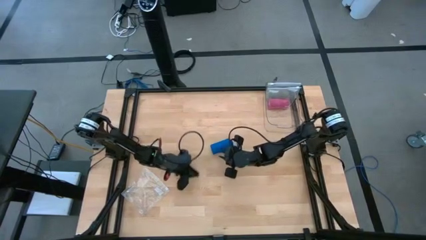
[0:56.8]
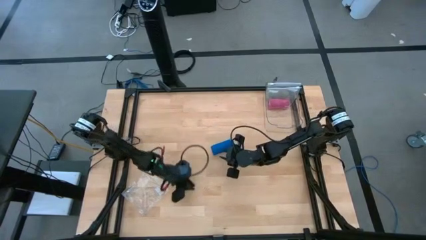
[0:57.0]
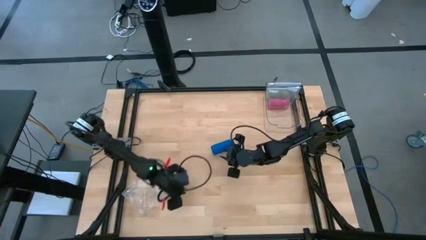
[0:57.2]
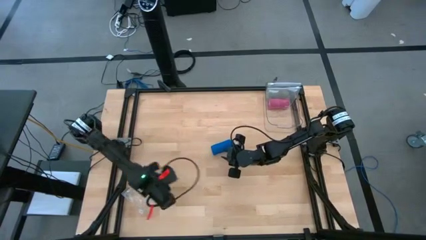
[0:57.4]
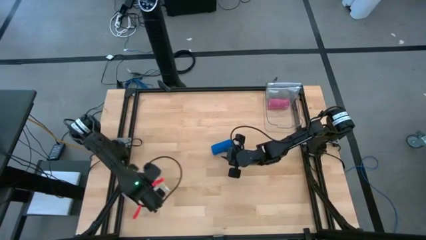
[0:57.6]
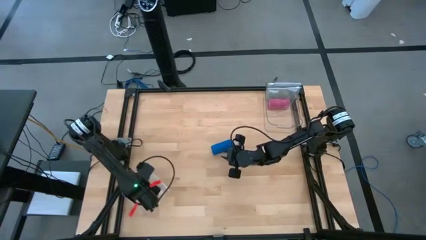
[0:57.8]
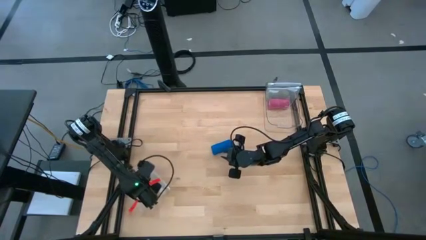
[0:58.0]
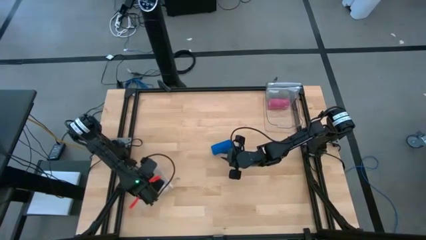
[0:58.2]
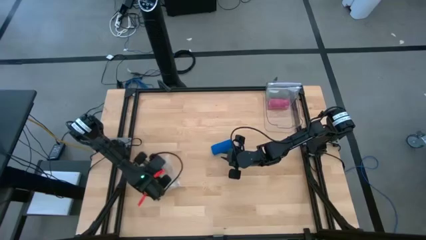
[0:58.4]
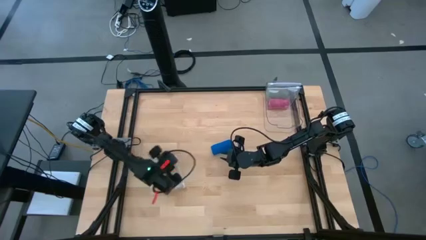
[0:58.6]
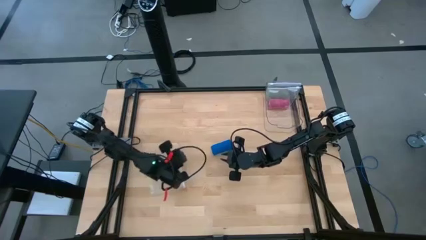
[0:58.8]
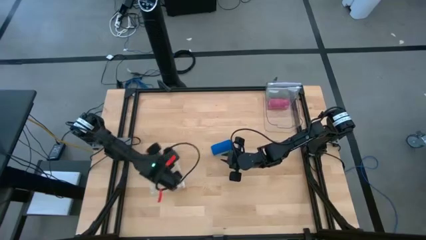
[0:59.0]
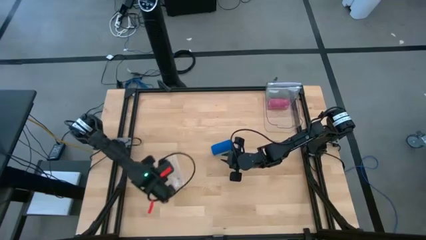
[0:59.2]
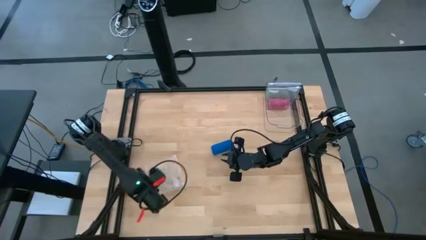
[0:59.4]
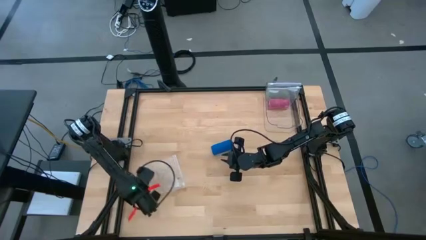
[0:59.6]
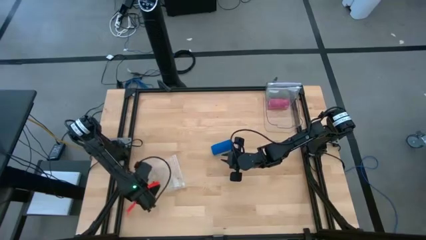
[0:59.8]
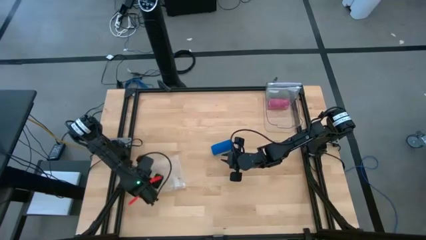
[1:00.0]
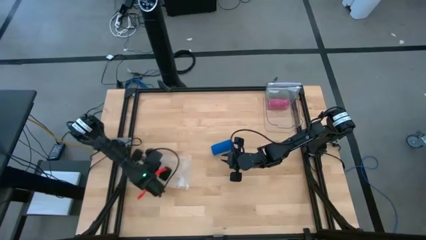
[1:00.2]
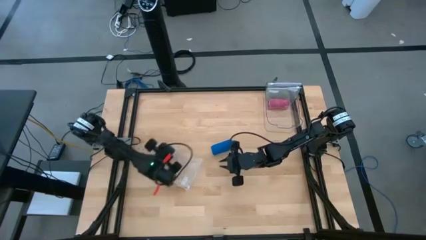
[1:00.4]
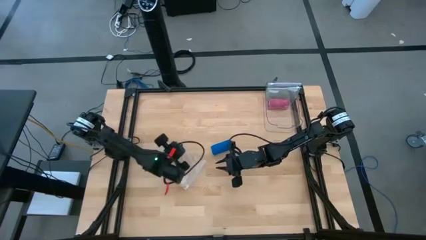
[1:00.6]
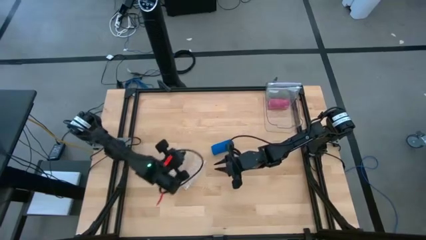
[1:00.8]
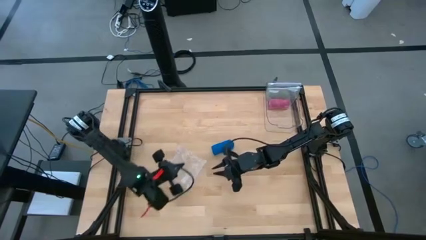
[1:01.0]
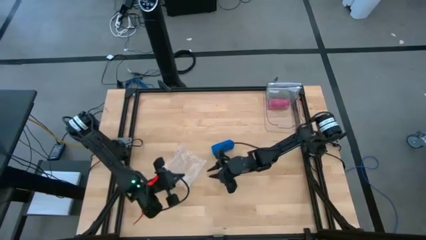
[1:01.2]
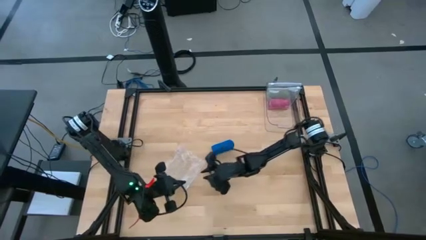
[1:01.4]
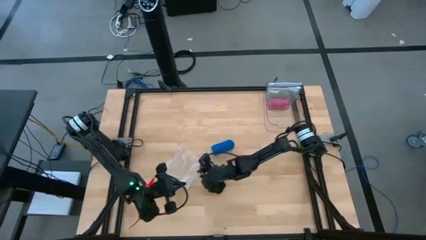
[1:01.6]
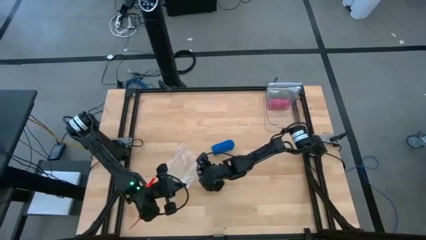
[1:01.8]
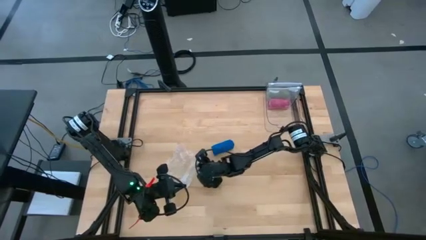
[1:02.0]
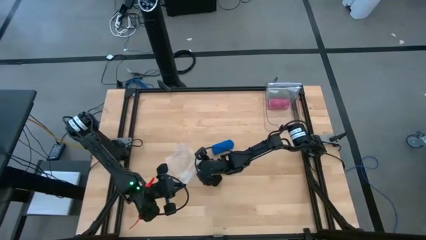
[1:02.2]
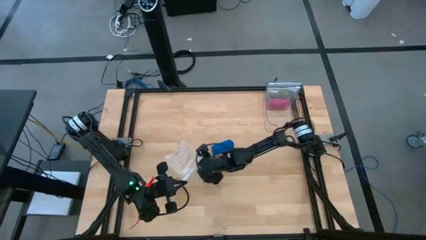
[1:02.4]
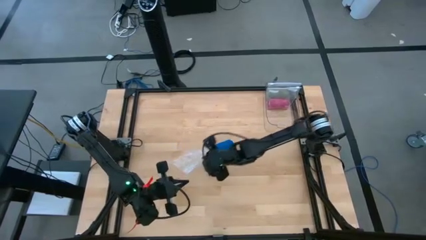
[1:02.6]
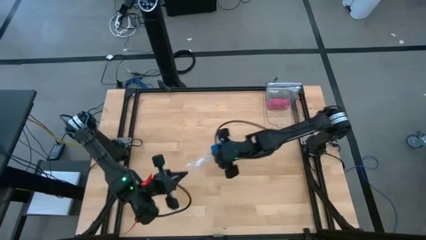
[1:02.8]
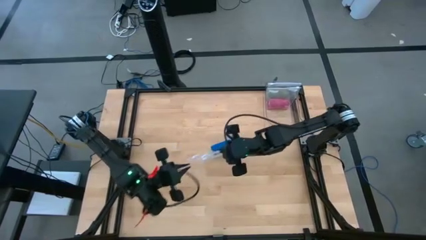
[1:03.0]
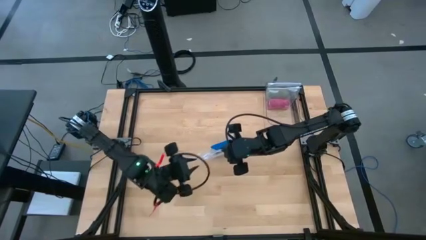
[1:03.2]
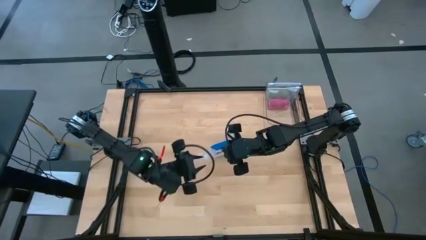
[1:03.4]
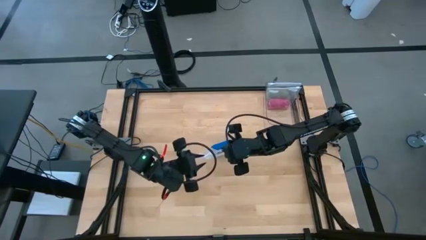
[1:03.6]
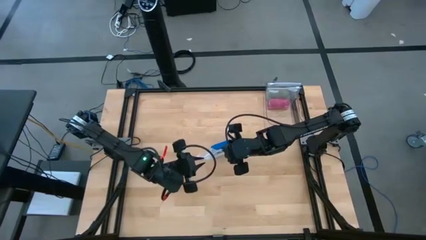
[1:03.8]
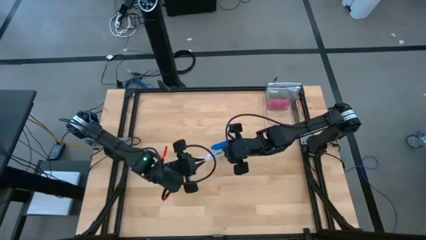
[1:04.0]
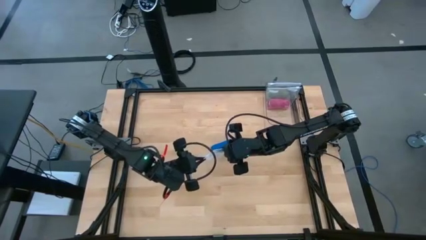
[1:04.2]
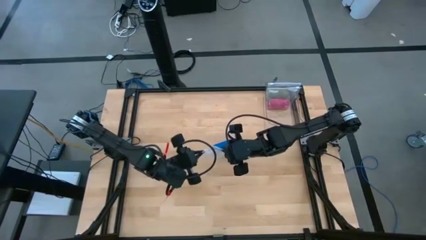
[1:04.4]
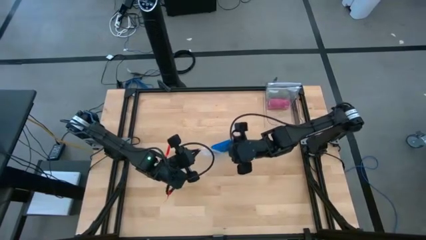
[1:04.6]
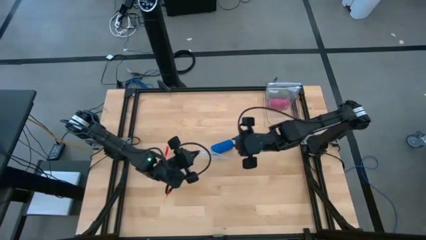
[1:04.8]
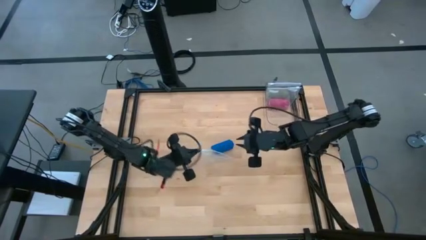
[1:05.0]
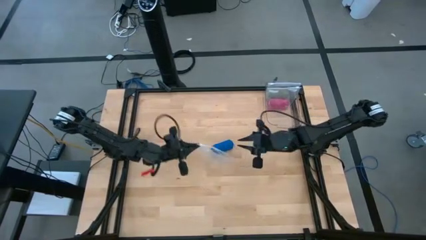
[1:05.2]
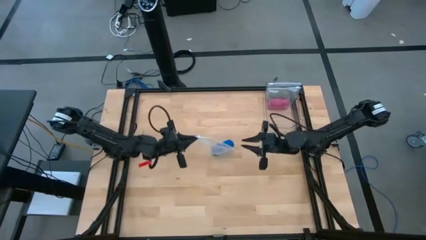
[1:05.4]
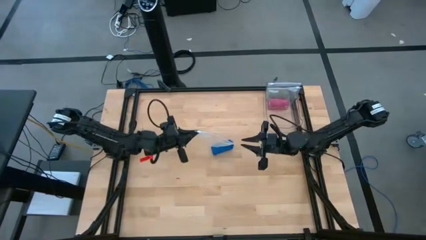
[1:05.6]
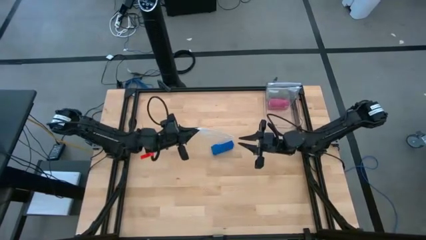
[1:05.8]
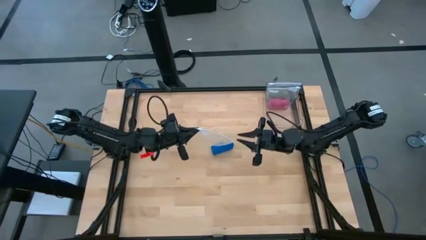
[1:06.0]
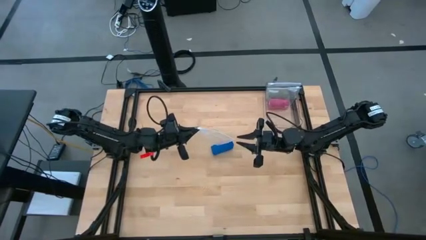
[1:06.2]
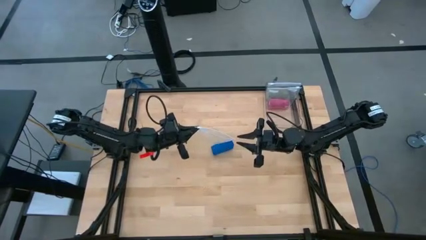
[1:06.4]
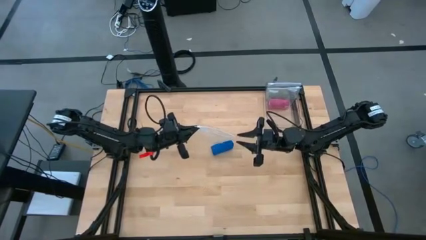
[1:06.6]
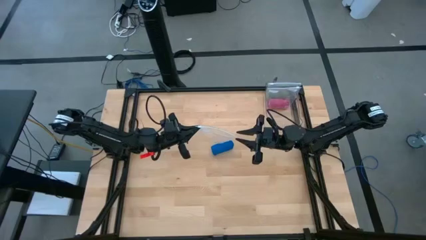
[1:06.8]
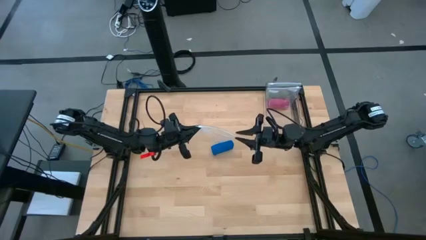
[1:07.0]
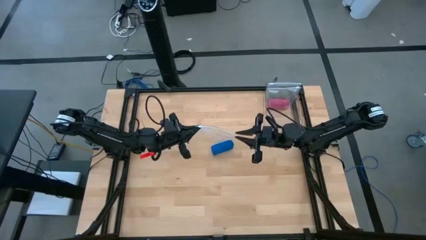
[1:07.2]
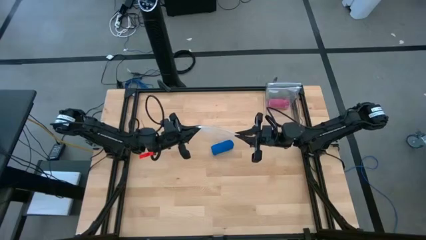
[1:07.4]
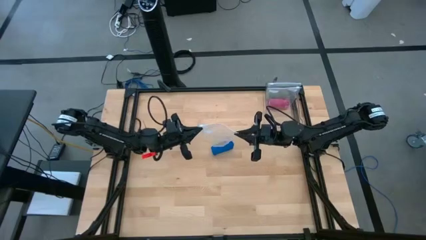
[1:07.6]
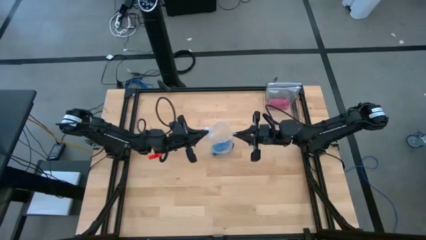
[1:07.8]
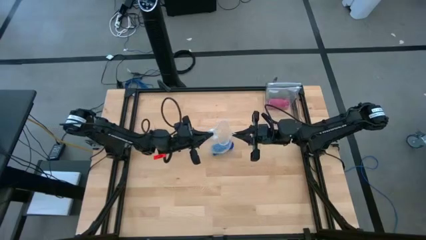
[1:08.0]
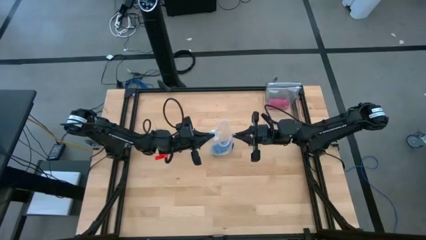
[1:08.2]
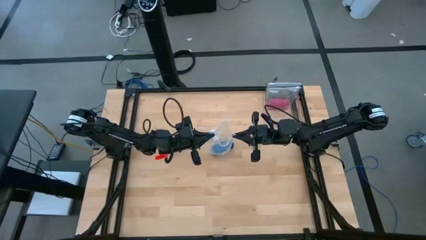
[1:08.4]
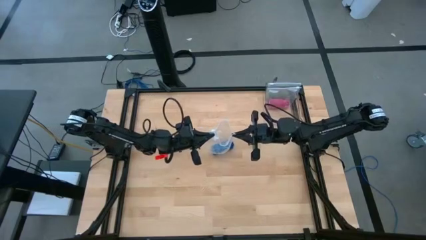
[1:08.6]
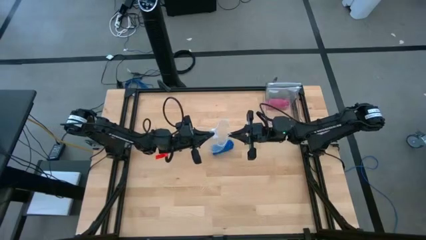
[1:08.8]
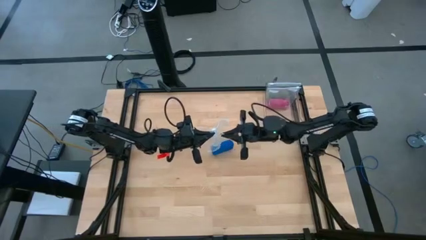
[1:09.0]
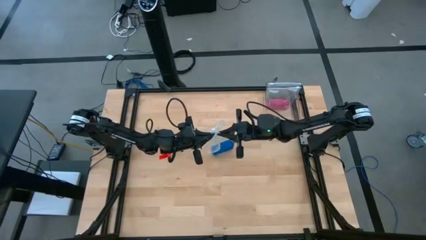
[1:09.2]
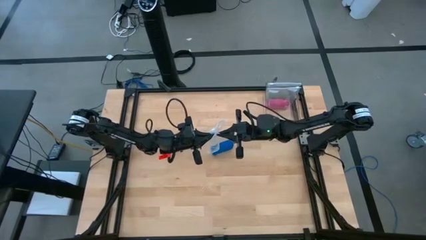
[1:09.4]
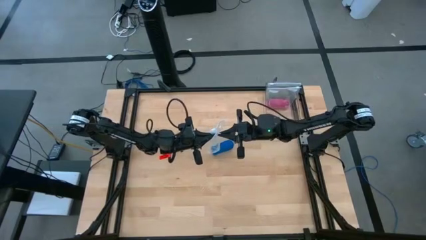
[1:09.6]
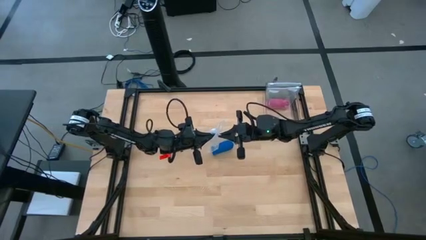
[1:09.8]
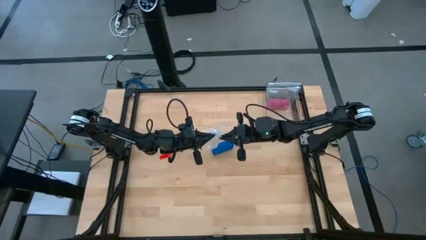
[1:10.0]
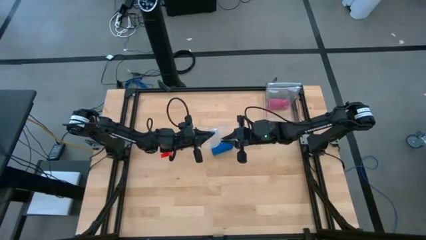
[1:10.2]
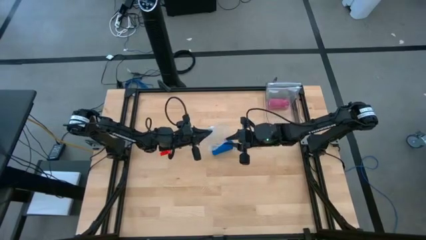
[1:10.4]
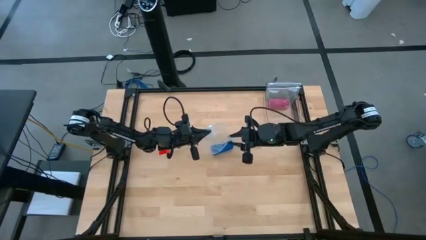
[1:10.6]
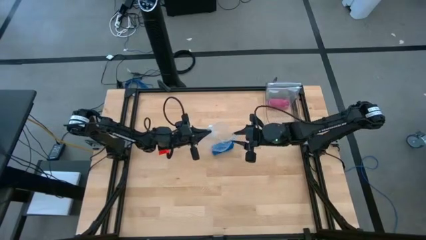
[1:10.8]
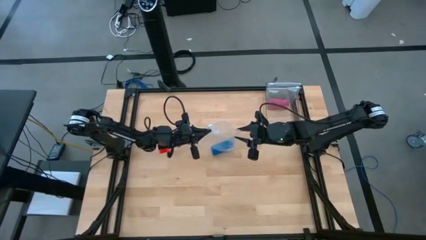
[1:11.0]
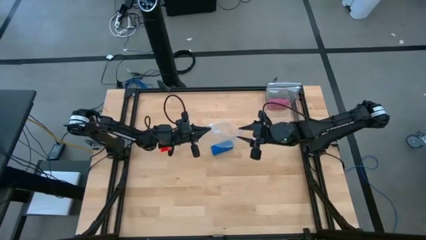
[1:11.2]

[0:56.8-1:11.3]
Task: Roll bandage
Prepare the transparent zip bag

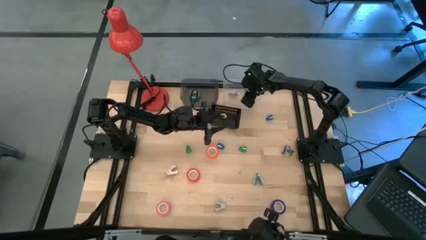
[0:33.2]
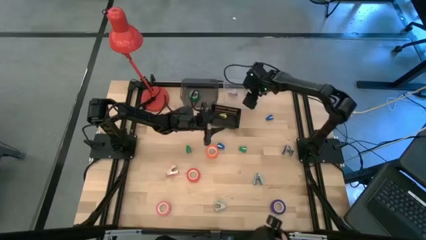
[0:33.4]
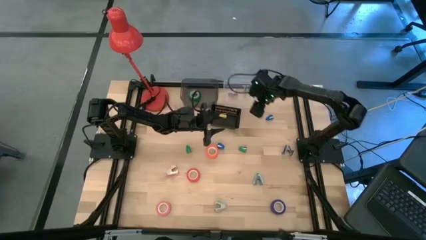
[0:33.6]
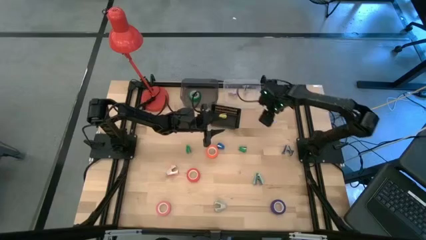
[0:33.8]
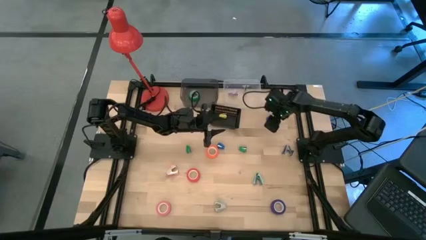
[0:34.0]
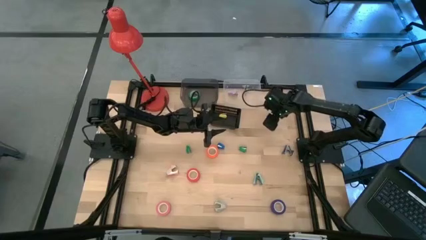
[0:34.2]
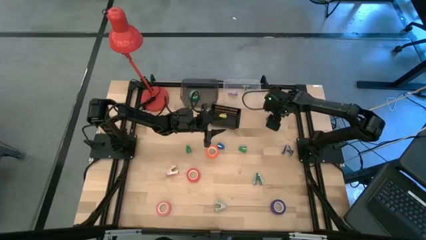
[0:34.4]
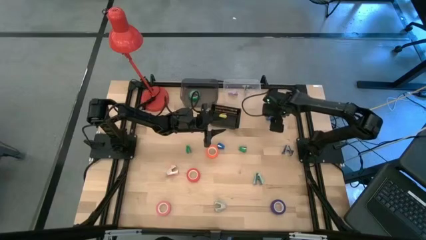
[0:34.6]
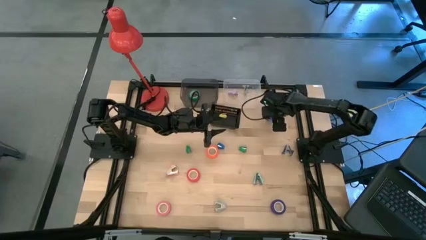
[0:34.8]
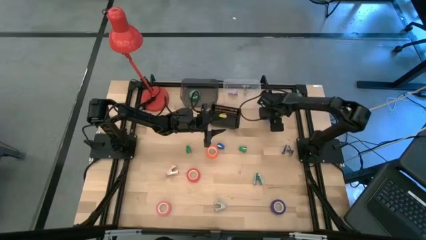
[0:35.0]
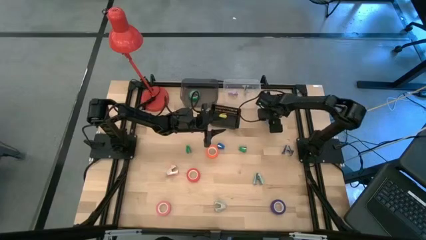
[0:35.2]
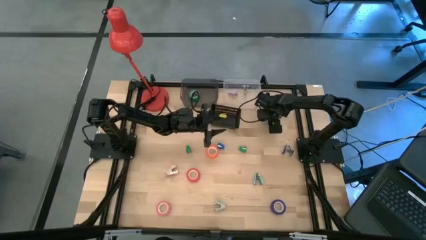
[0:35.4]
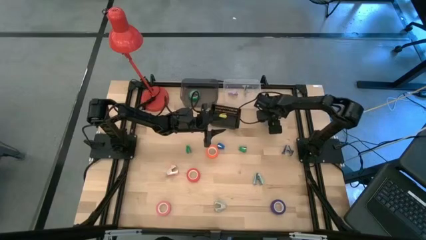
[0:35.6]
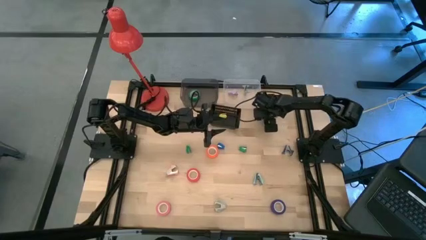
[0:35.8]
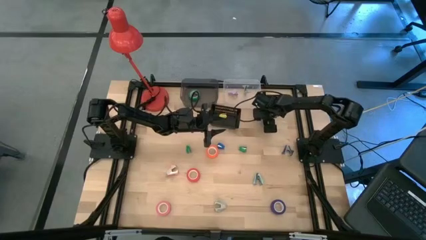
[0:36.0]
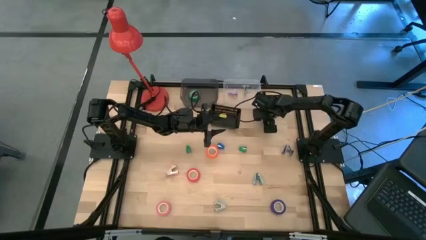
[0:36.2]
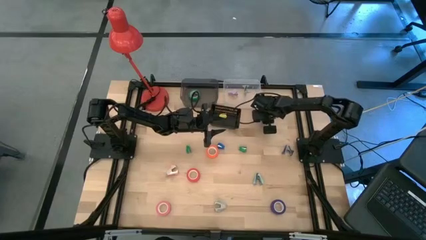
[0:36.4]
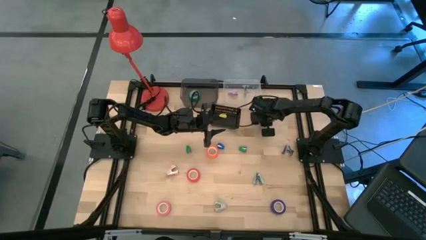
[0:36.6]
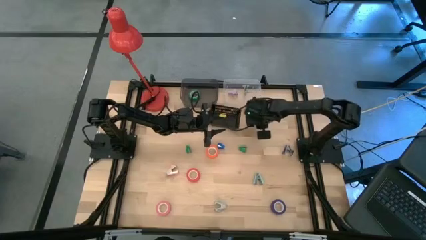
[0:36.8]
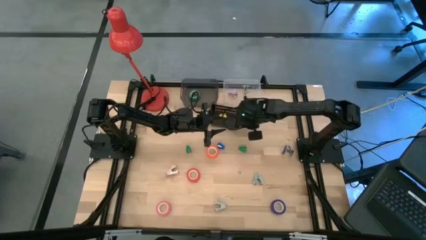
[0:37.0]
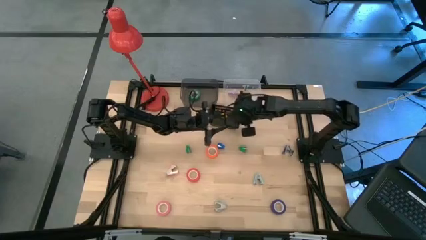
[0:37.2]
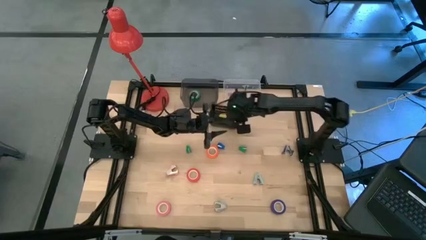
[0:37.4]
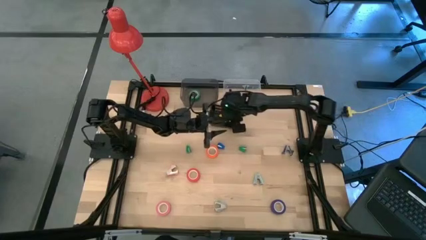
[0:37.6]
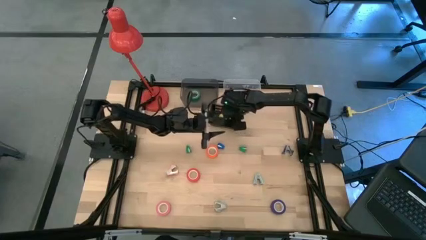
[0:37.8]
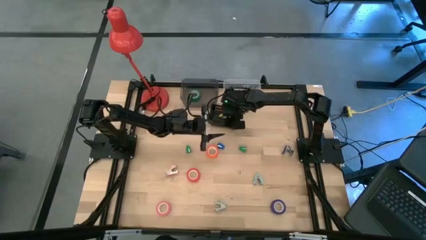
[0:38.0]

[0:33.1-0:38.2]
Task: Pick and place Stapler, Stapler remover, tape
Put the top blue mini-stapler into the black bin
